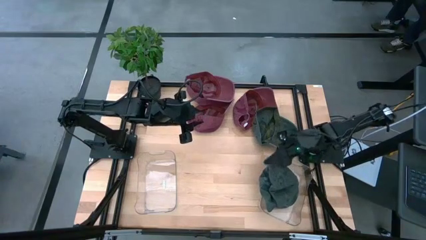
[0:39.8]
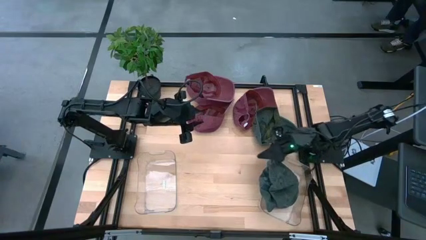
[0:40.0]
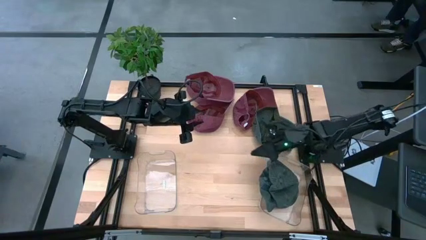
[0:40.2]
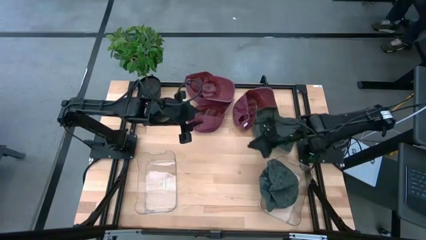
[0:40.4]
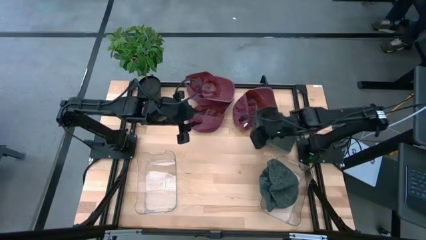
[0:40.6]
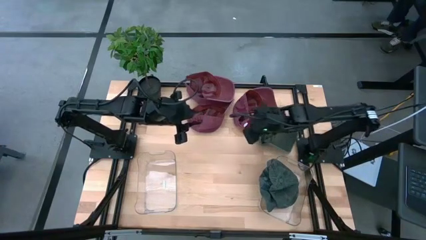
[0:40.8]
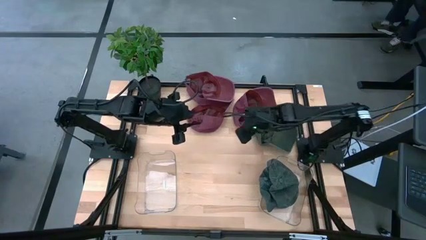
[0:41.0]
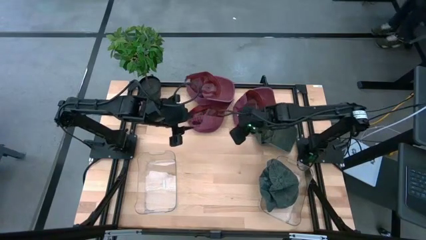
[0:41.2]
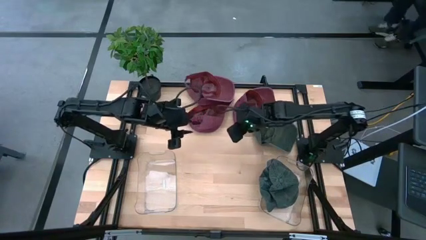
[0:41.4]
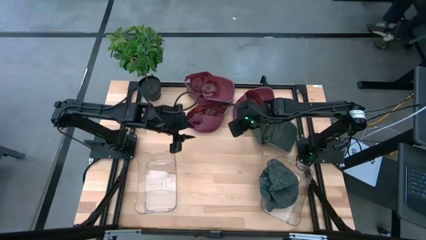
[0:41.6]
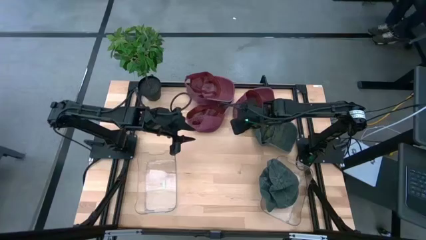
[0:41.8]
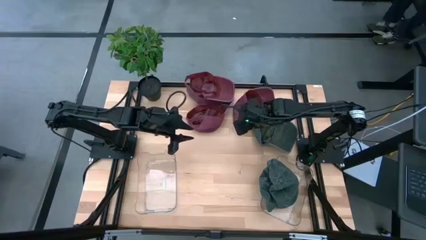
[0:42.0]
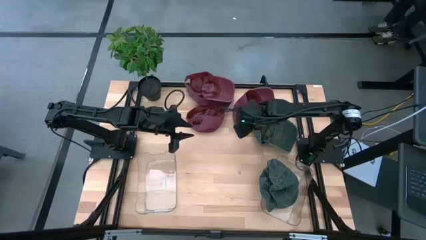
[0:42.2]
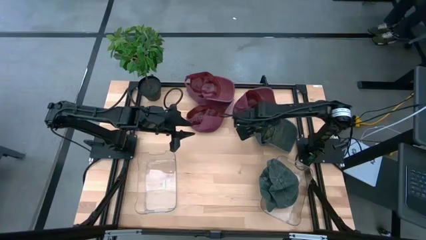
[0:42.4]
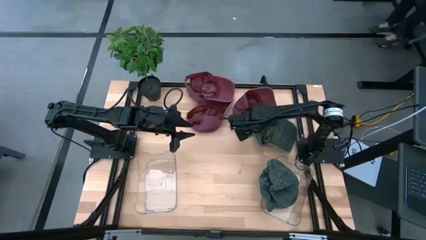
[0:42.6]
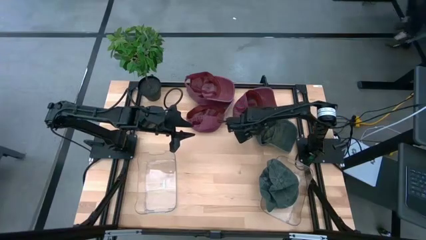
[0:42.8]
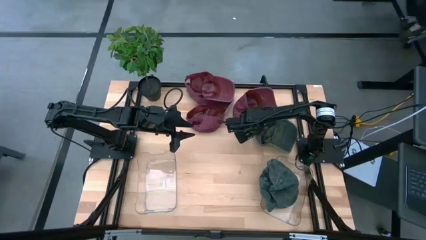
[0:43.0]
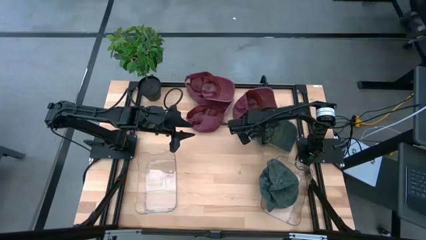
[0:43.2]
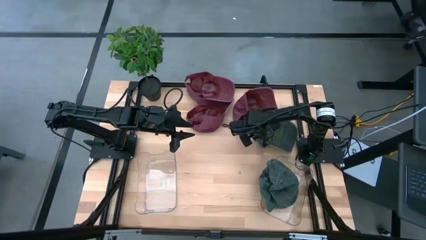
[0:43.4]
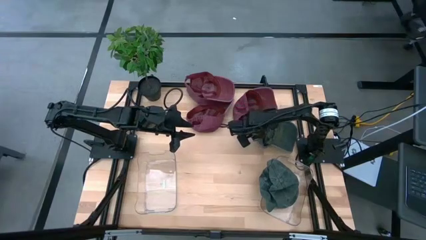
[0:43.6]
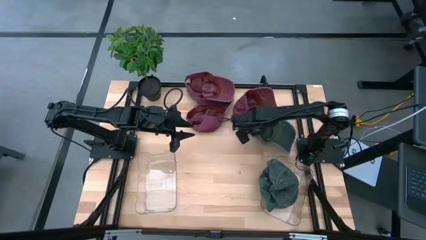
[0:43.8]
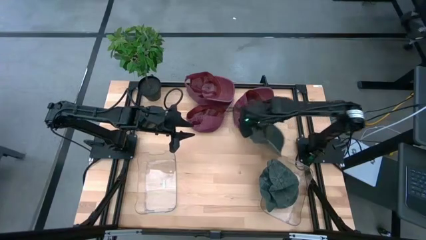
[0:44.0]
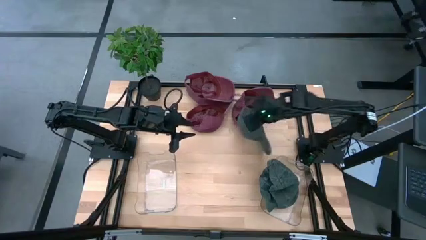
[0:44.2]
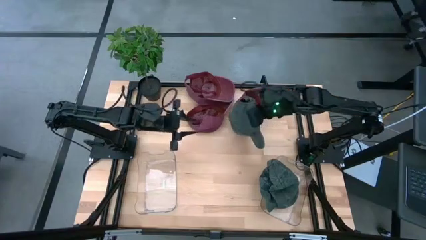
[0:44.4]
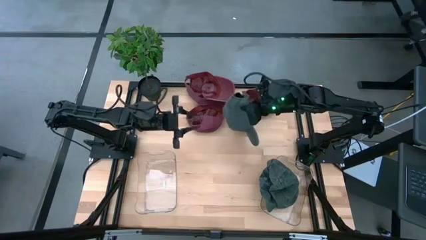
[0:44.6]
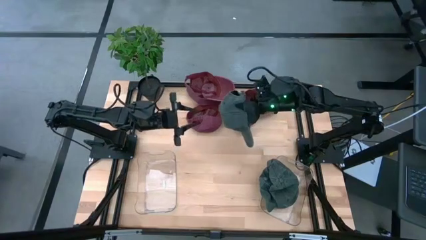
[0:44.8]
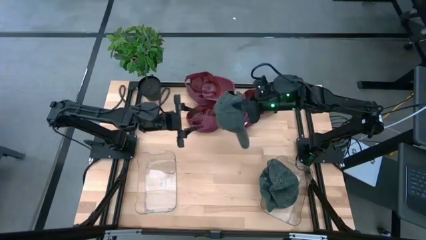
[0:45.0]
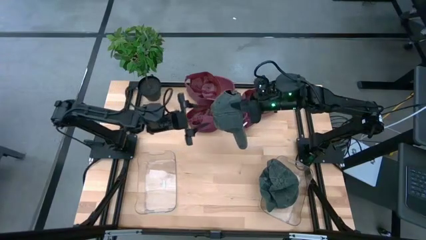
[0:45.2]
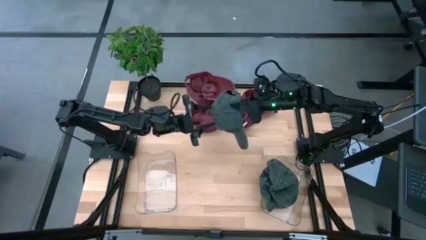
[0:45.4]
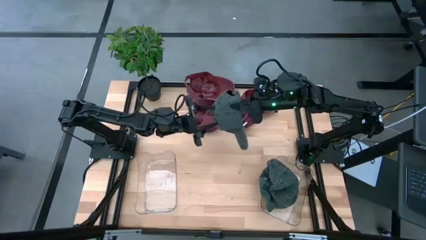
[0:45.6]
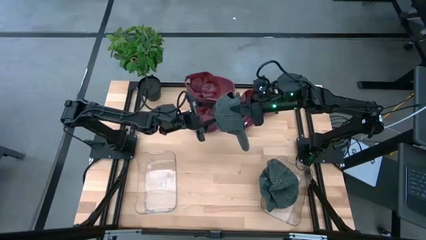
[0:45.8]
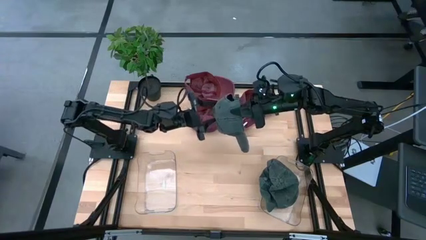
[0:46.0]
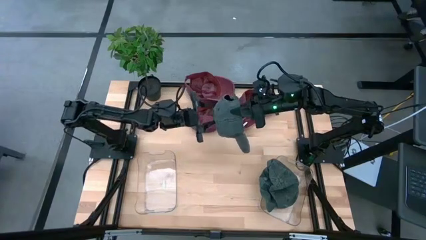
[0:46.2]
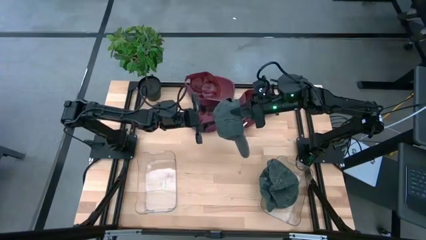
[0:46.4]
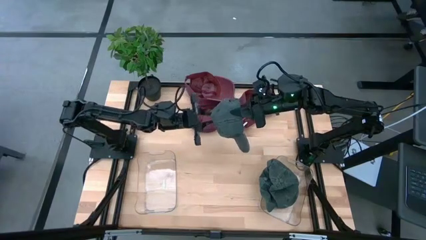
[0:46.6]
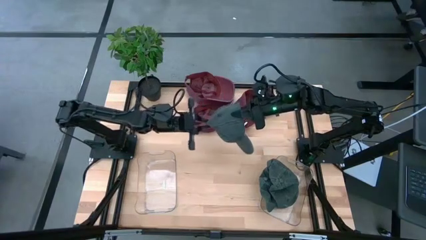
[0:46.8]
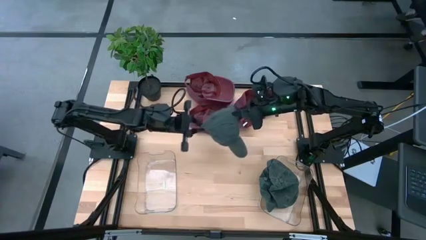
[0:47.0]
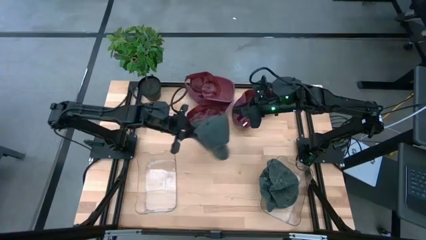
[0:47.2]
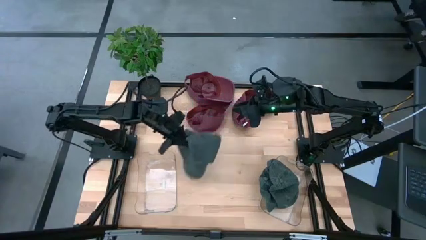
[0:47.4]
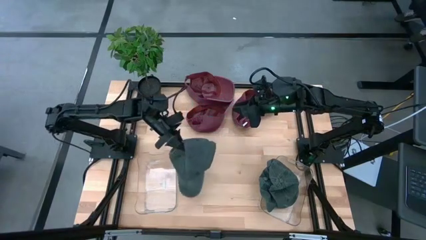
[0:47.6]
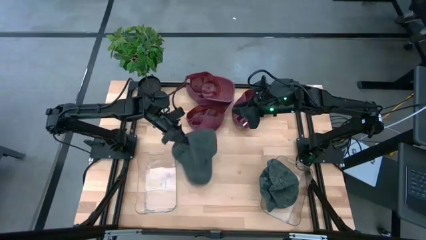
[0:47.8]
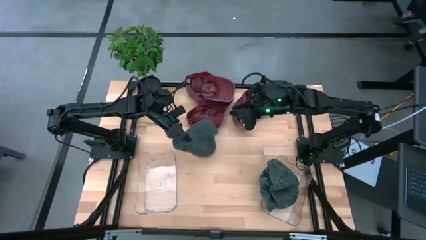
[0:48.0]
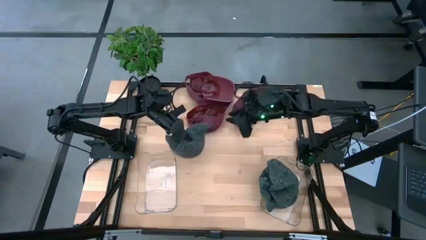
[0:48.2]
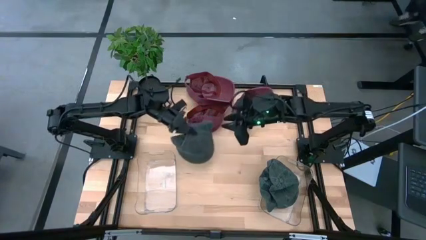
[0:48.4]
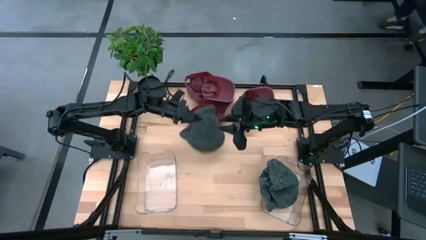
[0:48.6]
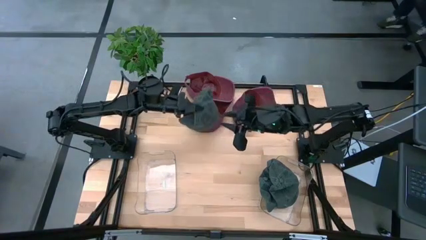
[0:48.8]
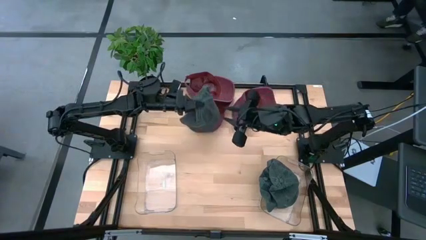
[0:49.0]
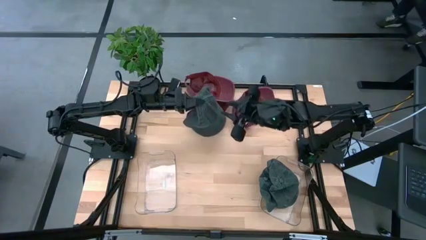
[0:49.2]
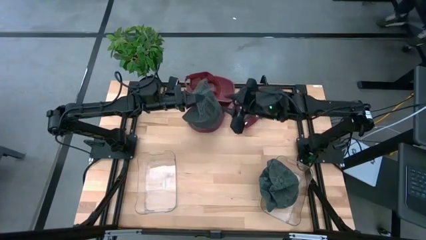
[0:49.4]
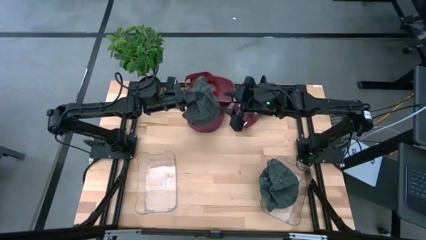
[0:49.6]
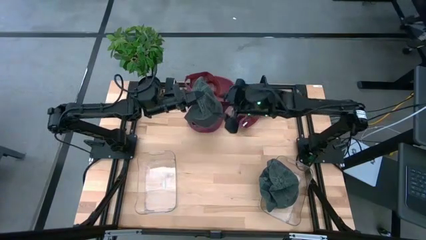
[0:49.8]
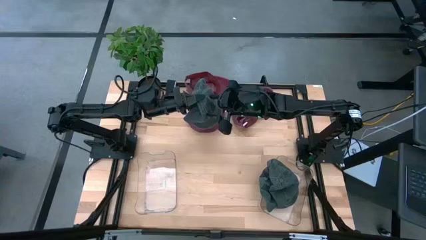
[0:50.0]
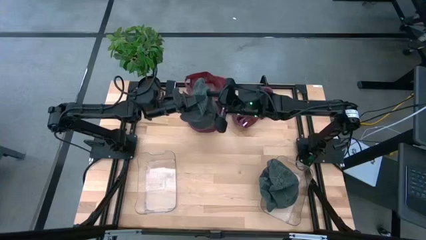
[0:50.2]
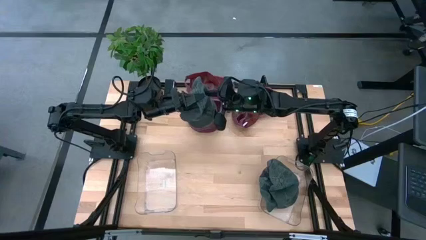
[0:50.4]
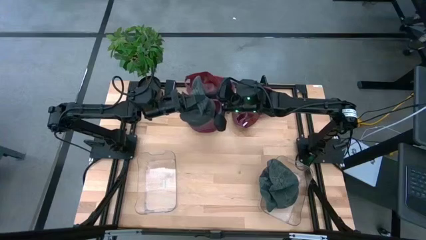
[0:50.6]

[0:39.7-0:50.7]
Task: Pick & Place hat
Put the gray cap into the right transparent bin
